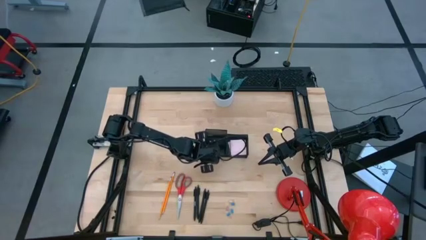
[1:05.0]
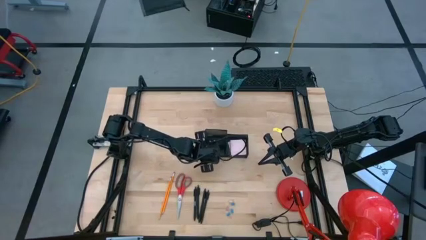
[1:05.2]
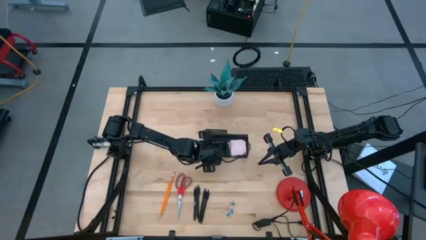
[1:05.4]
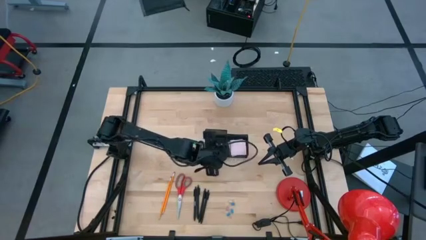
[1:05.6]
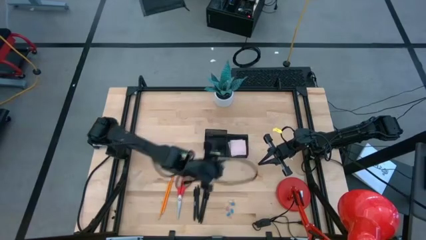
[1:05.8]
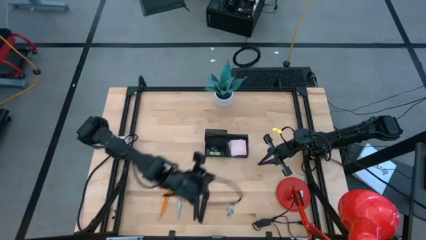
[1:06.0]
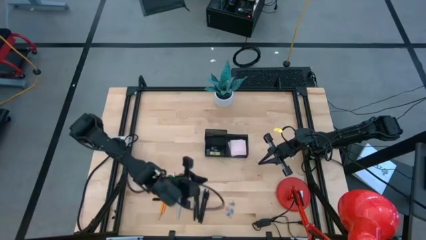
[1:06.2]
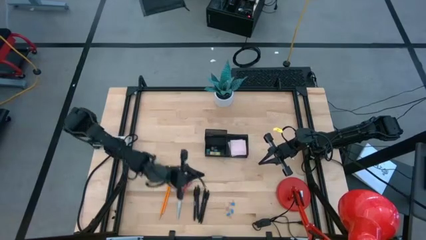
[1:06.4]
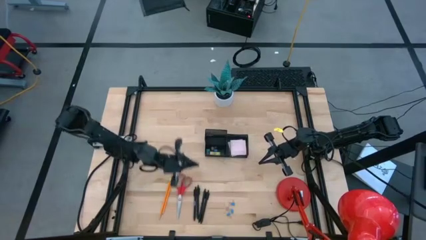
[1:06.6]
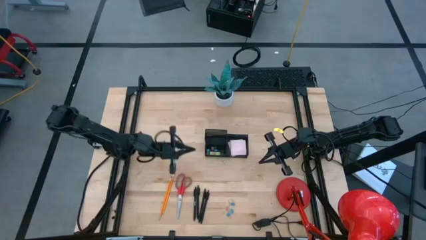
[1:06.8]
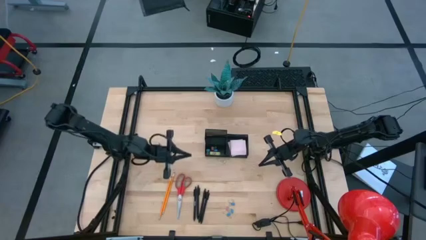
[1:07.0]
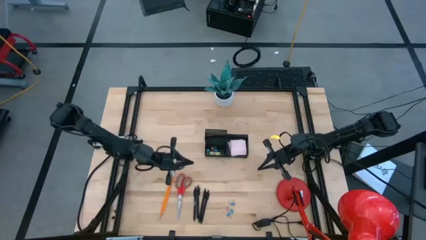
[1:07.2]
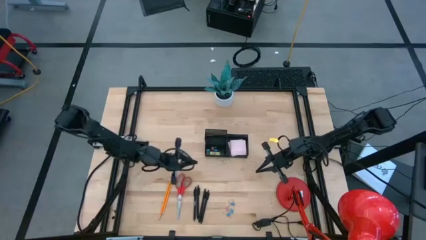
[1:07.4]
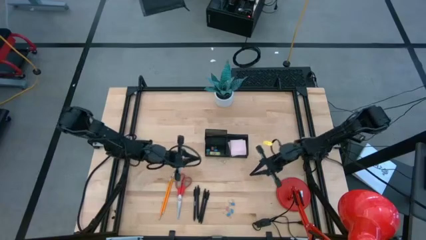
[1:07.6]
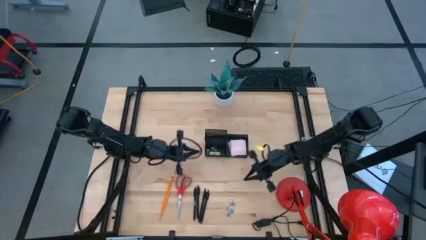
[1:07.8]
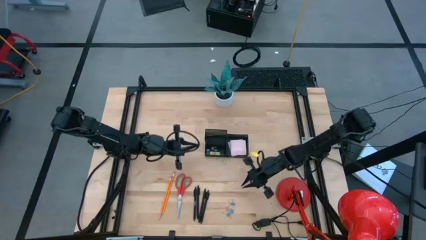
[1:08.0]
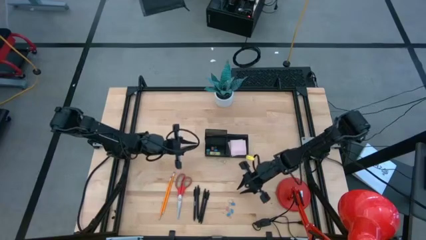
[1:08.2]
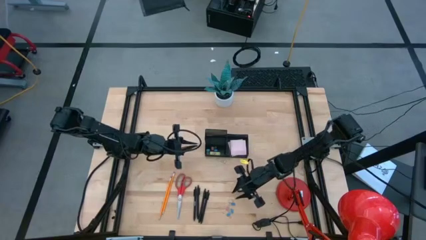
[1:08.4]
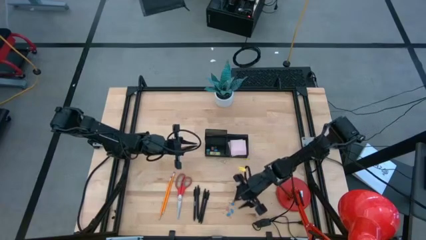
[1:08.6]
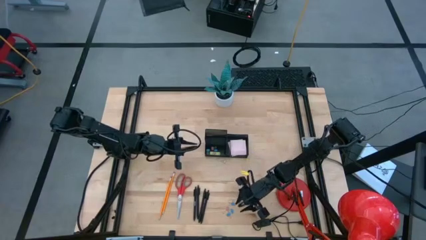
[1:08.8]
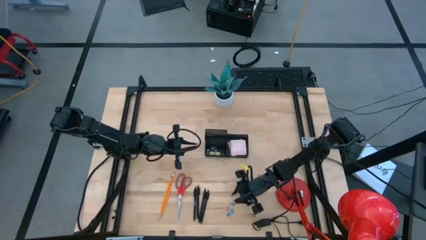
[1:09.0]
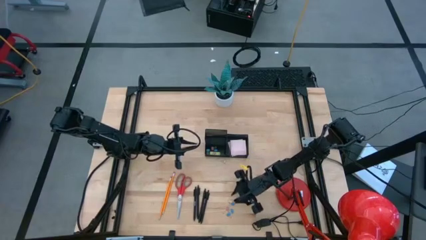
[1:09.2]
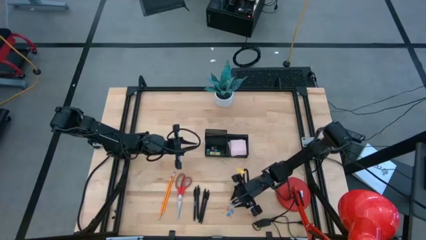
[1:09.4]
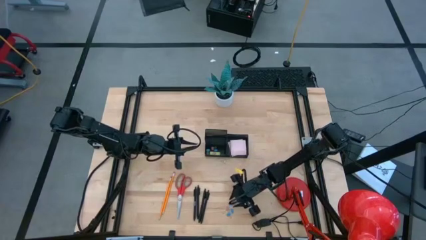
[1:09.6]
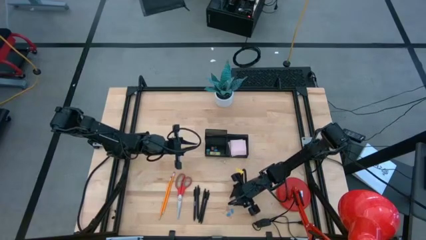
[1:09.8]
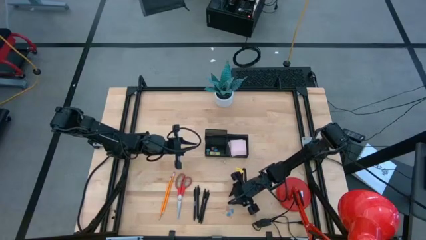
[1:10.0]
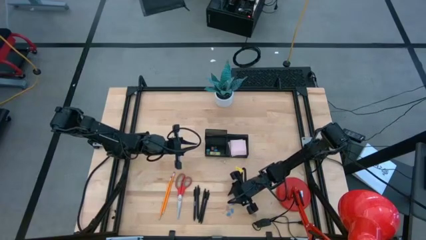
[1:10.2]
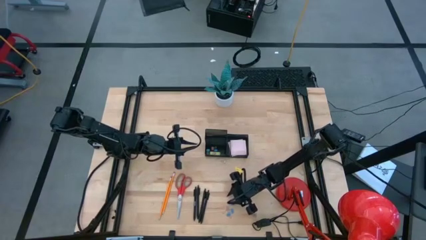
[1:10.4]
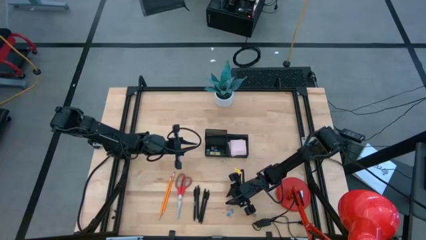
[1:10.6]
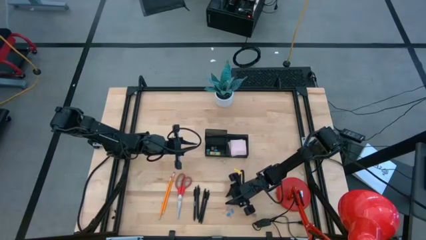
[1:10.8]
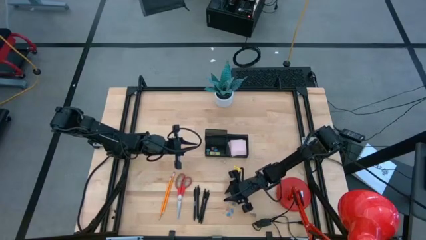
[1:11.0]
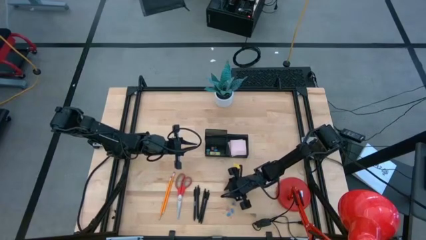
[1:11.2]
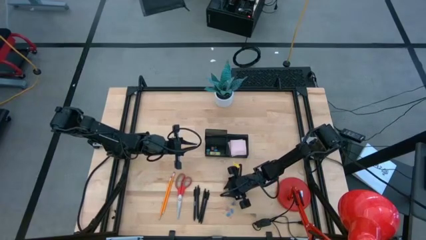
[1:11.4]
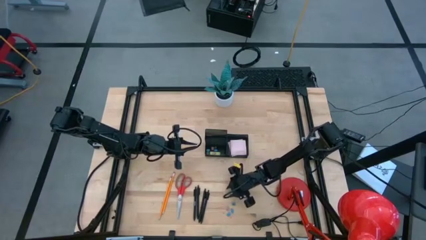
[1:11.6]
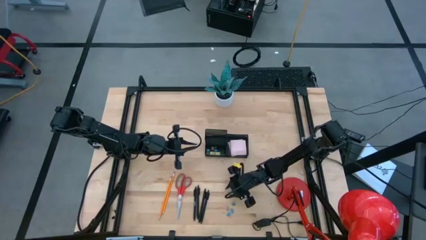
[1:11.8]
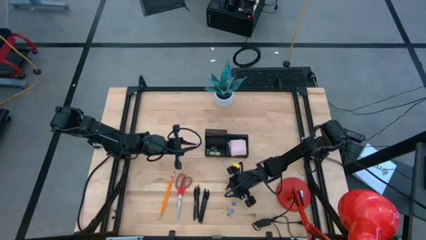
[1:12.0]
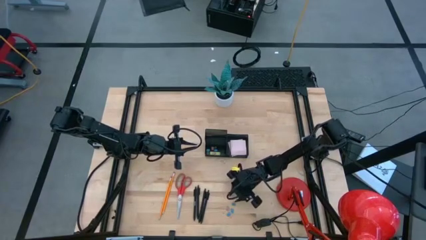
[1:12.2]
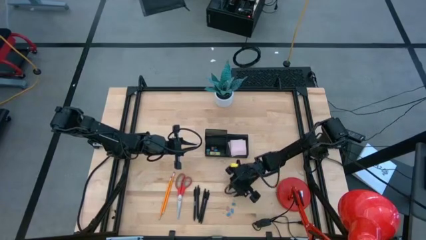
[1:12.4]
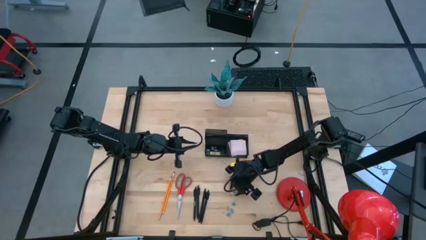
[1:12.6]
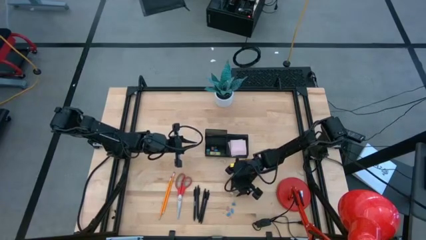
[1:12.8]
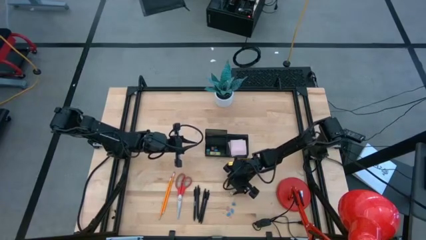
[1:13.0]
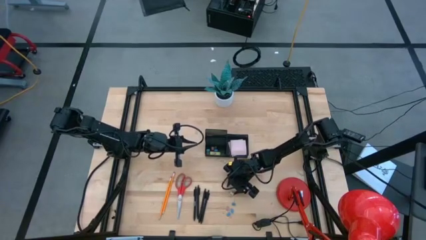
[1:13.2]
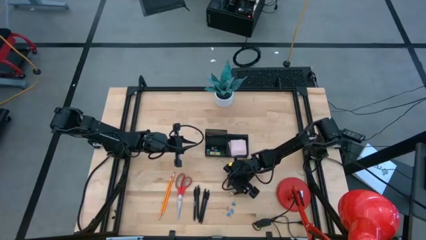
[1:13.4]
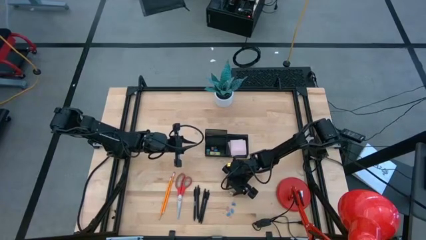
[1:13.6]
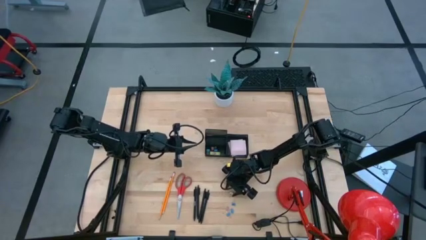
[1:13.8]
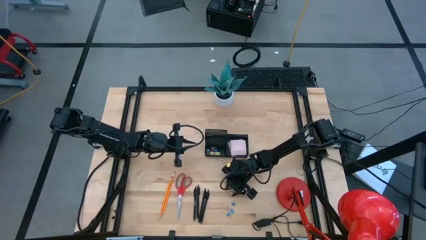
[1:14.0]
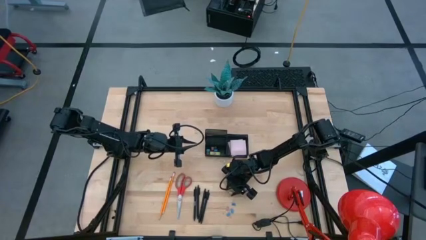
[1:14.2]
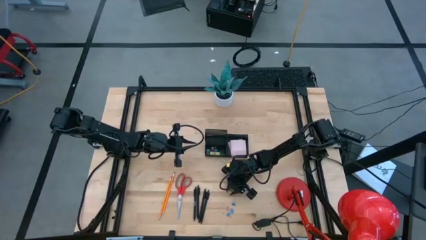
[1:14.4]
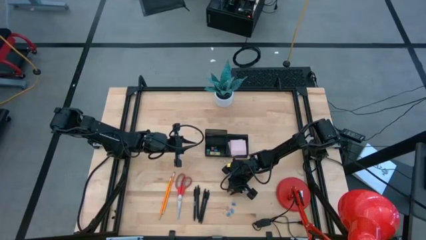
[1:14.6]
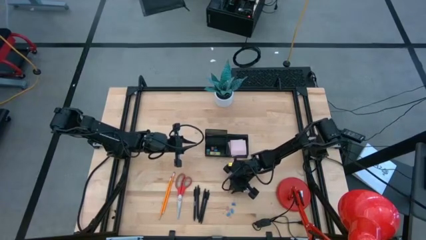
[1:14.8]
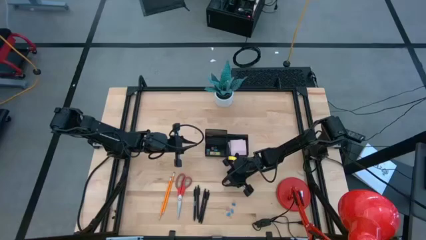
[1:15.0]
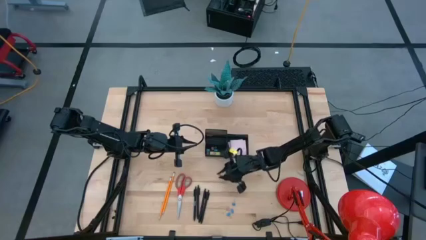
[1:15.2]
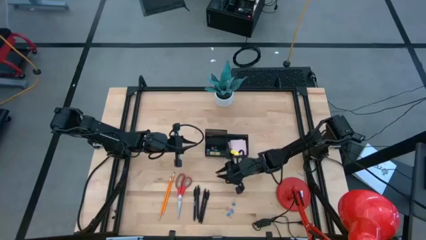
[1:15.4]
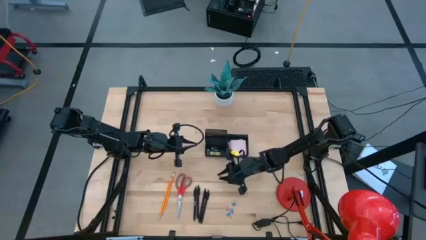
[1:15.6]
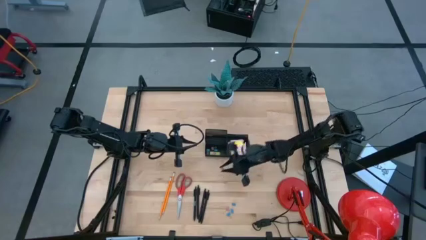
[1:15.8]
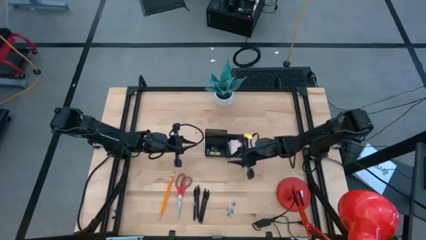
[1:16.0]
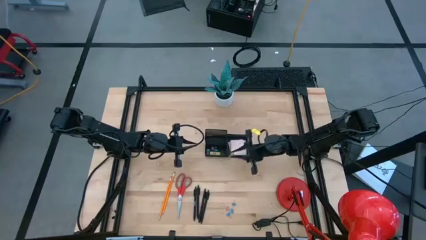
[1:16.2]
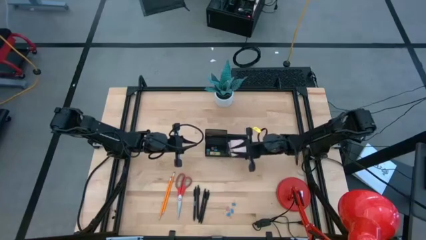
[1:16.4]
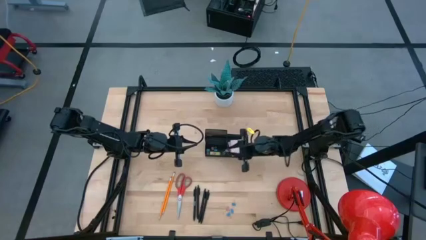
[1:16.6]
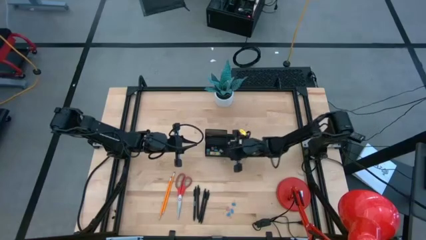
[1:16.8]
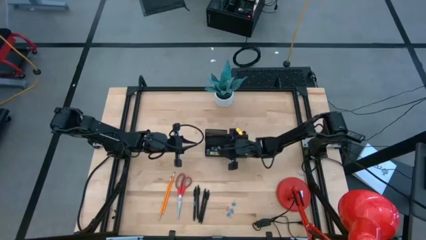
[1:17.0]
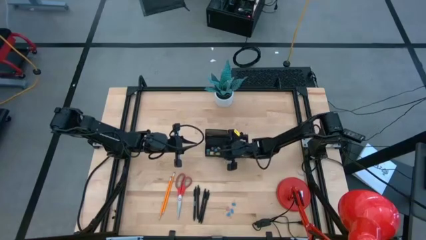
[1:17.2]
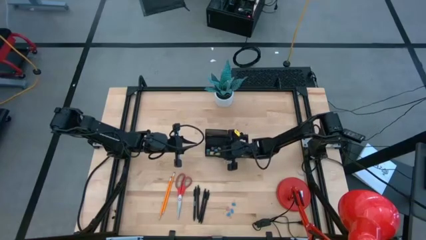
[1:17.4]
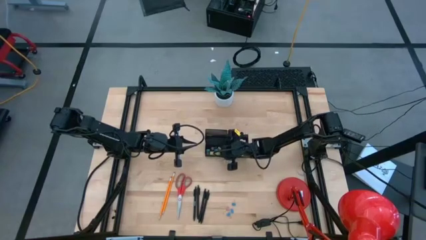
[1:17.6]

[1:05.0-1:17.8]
Task: Pick and place office supplies into organizer
Put the green binder clip into the black desk organizer

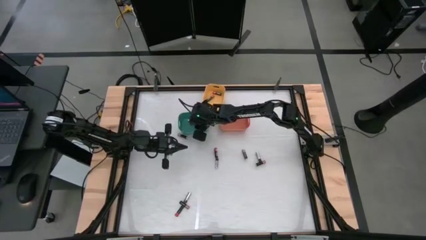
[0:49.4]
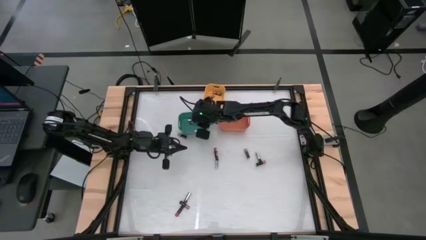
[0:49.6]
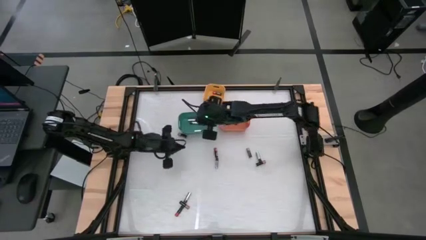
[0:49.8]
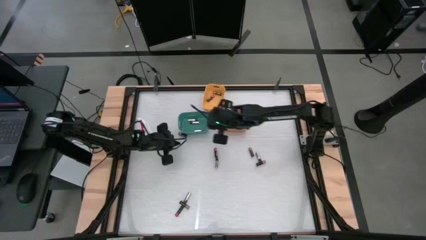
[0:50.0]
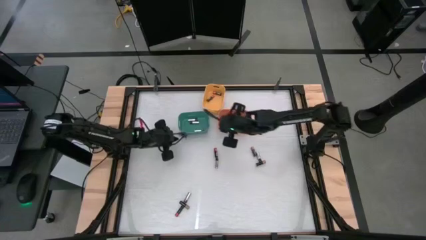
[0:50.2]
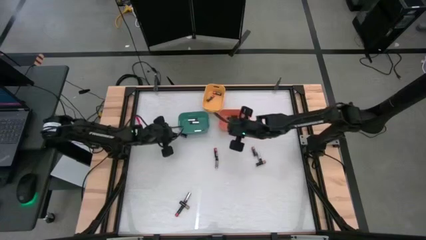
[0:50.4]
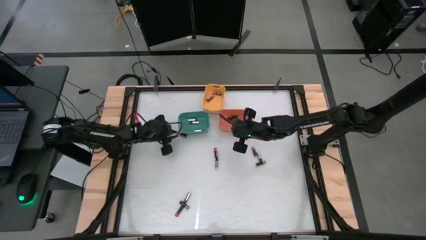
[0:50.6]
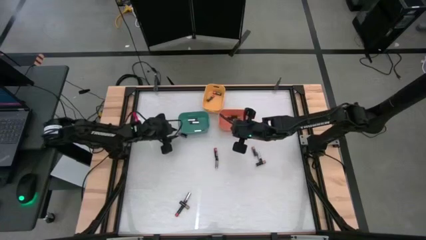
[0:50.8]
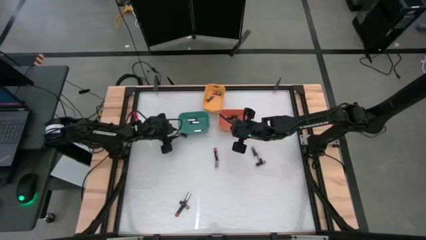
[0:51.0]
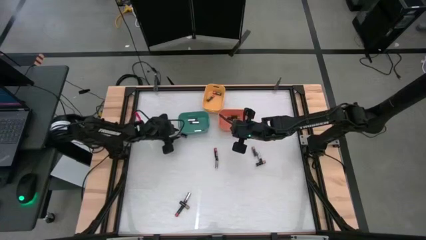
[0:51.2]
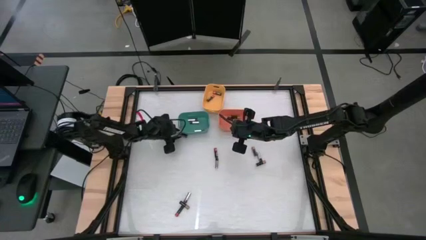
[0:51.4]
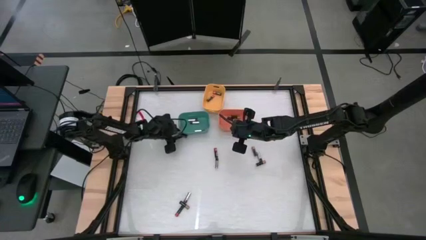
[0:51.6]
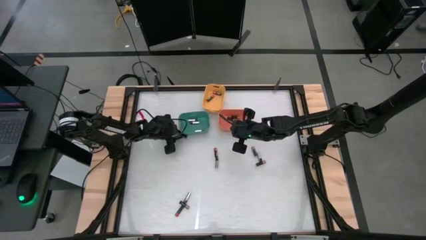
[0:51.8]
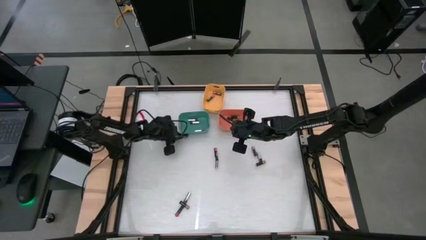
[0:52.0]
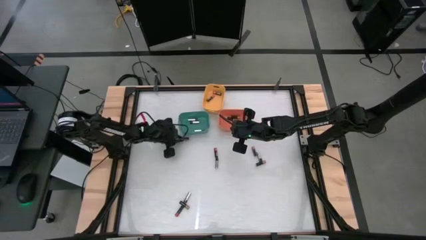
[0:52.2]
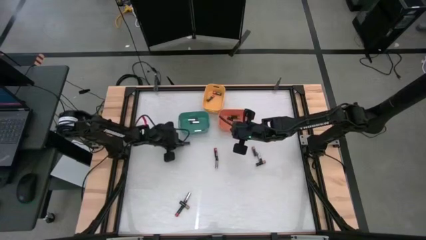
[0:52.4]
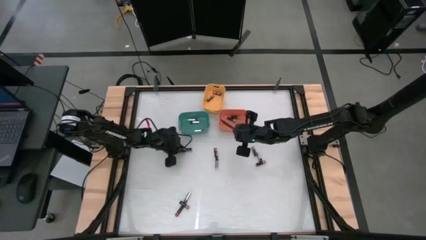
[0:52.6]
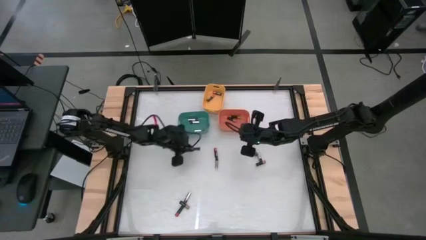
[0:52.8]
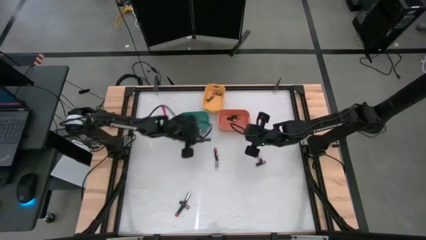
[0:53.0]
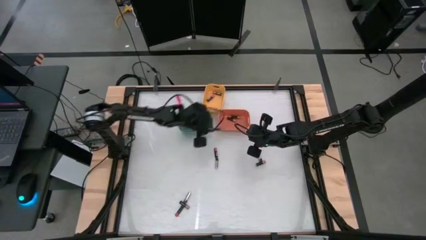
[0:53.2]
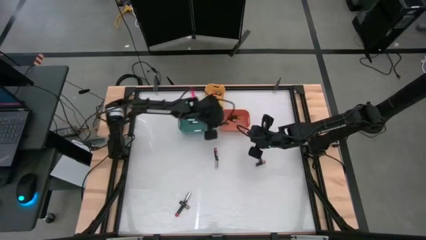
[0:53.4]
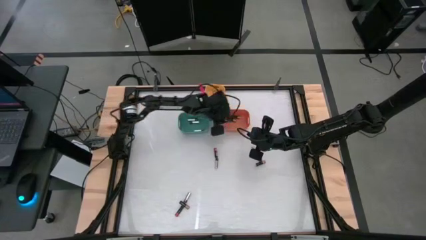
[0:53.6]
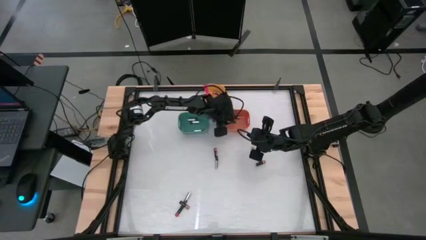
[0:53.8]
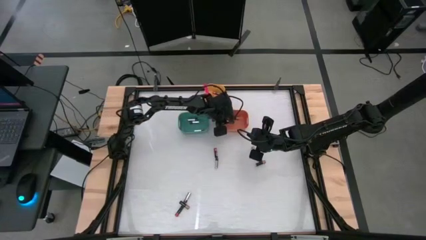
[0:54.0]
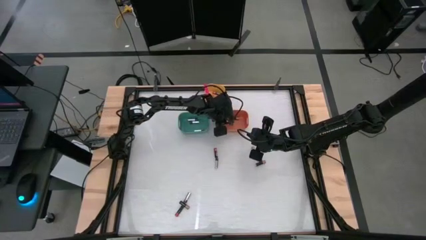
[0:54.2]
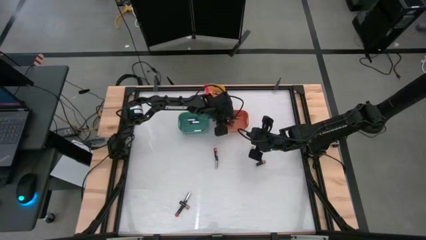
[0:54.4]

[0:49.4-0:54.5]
Task: Sort batteries
Put the brown battery into the orange bin
